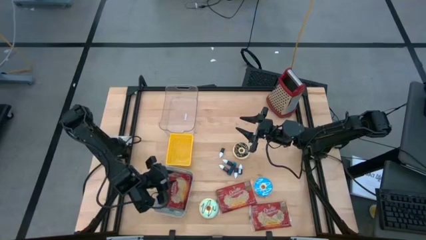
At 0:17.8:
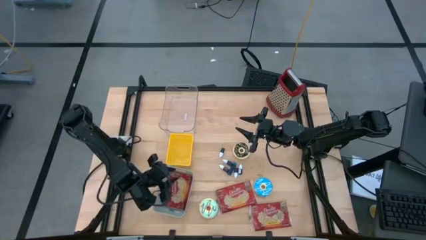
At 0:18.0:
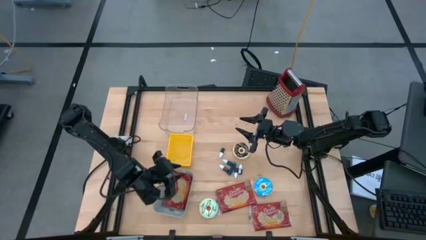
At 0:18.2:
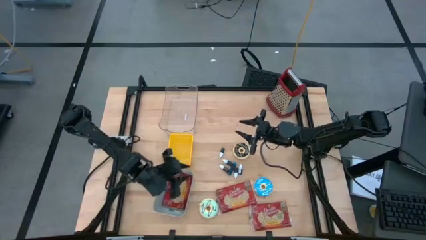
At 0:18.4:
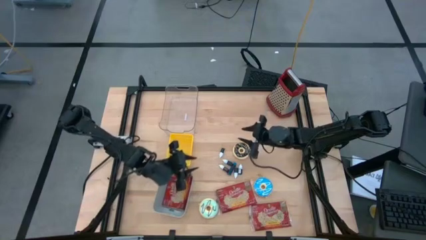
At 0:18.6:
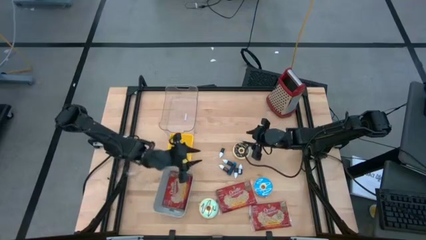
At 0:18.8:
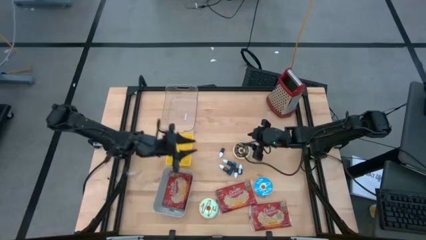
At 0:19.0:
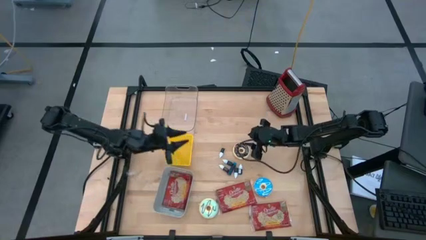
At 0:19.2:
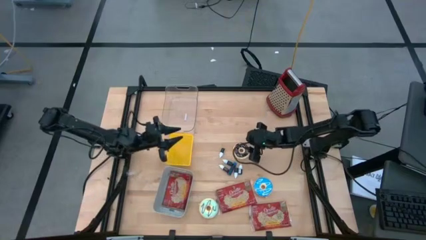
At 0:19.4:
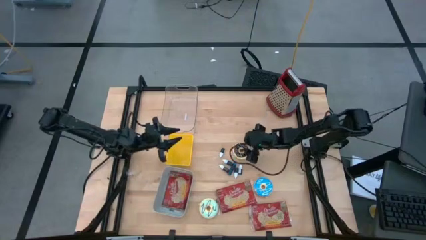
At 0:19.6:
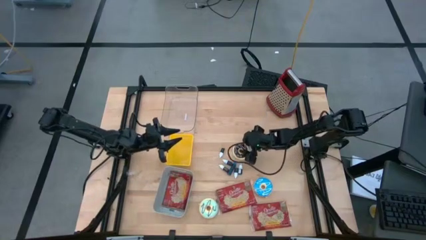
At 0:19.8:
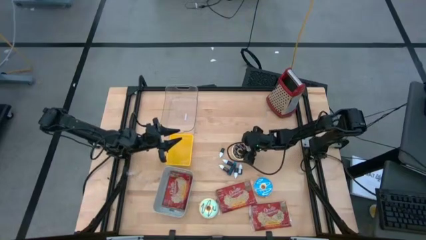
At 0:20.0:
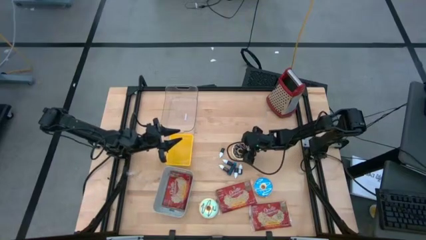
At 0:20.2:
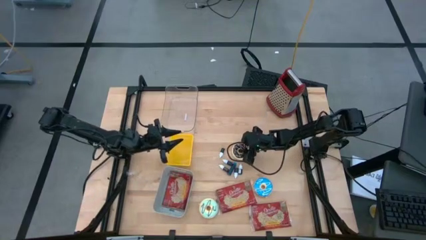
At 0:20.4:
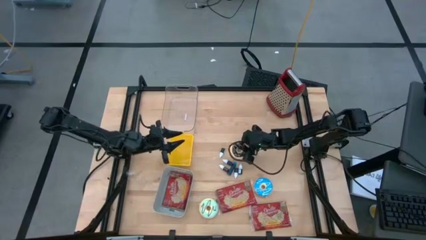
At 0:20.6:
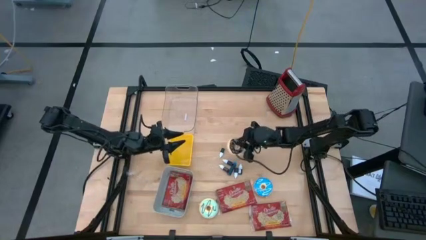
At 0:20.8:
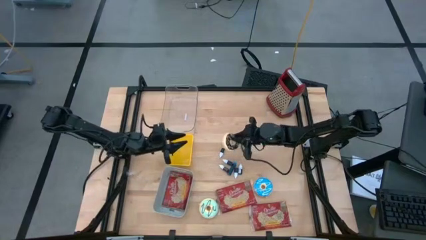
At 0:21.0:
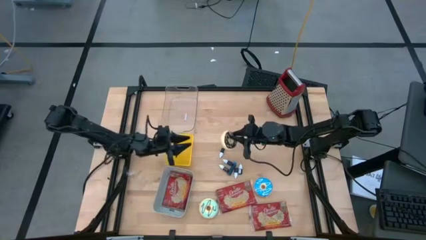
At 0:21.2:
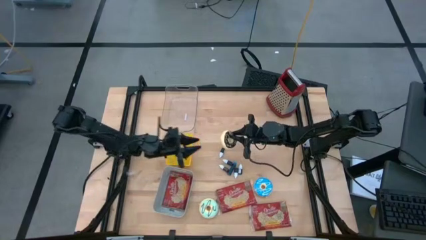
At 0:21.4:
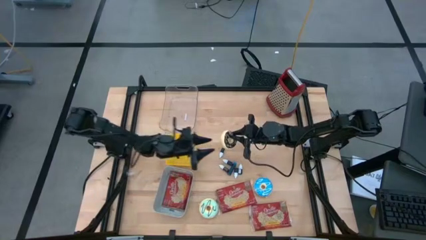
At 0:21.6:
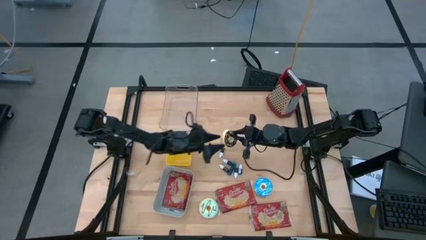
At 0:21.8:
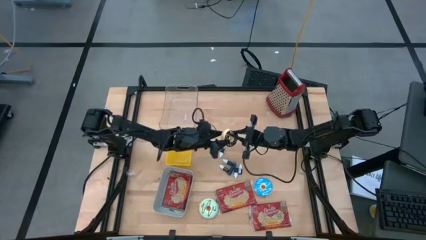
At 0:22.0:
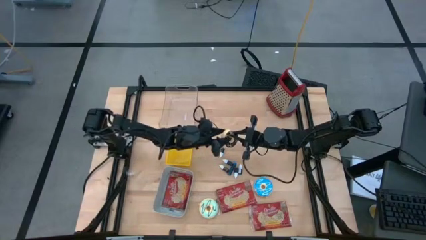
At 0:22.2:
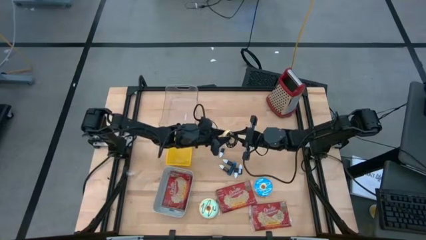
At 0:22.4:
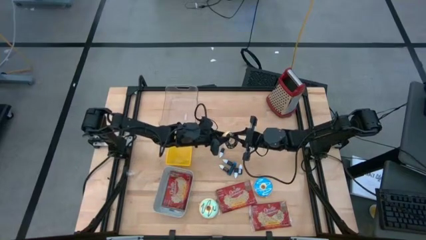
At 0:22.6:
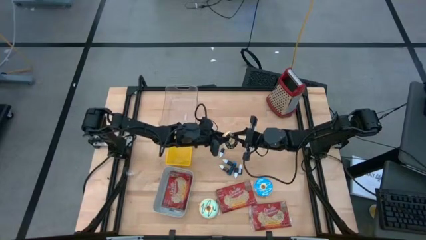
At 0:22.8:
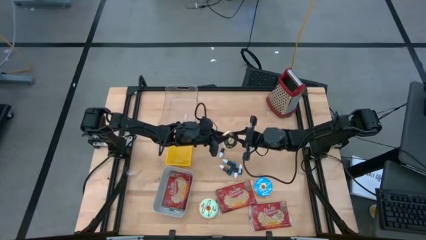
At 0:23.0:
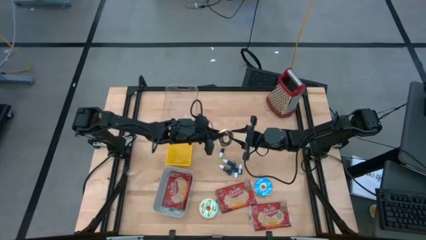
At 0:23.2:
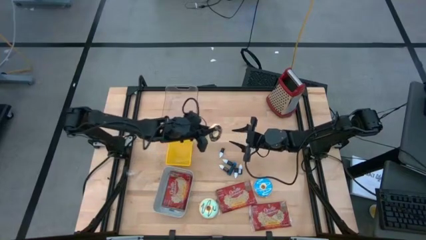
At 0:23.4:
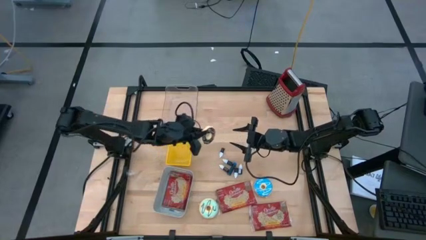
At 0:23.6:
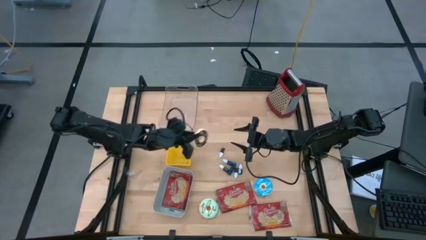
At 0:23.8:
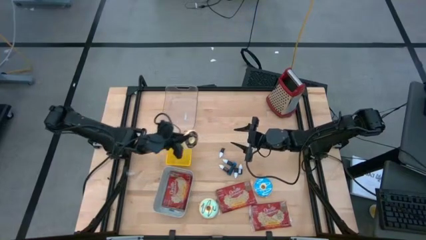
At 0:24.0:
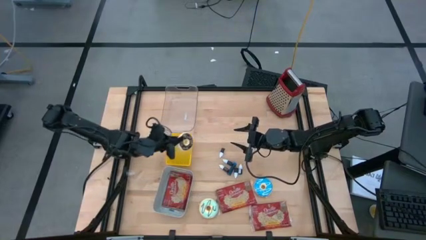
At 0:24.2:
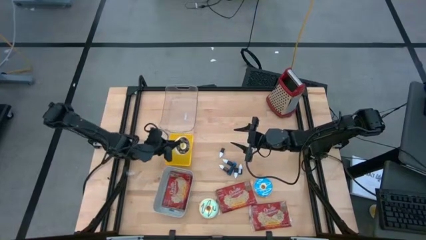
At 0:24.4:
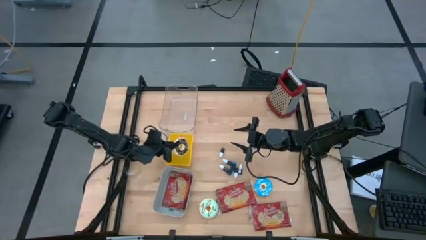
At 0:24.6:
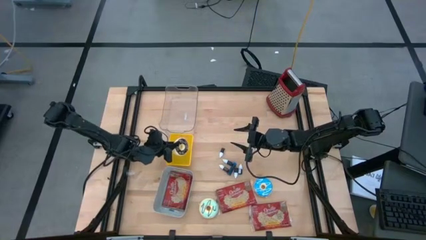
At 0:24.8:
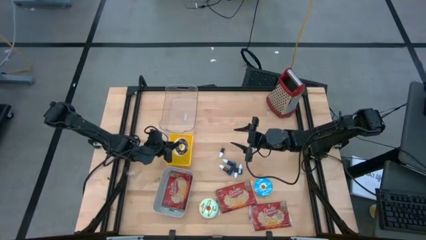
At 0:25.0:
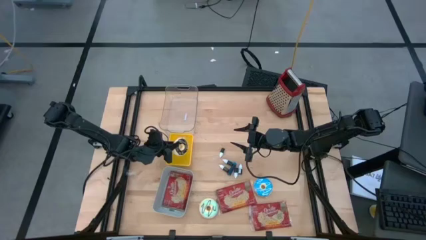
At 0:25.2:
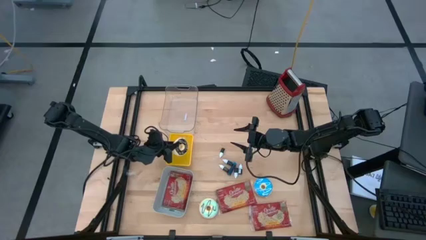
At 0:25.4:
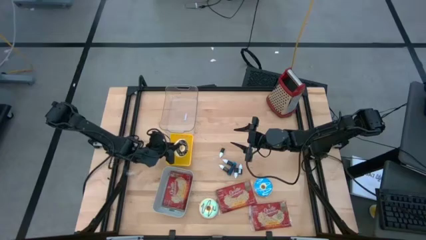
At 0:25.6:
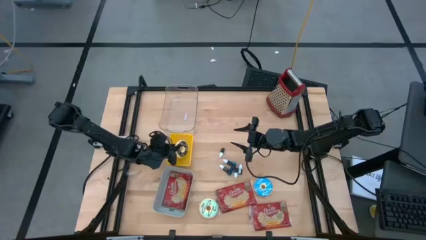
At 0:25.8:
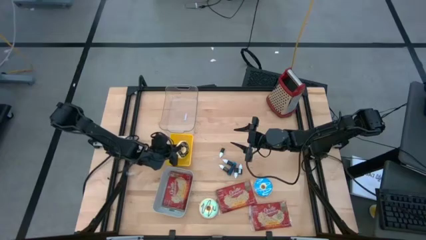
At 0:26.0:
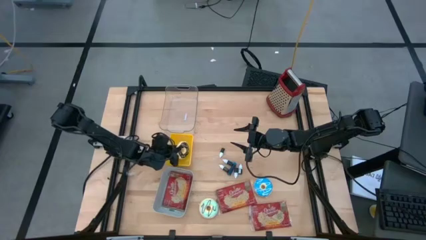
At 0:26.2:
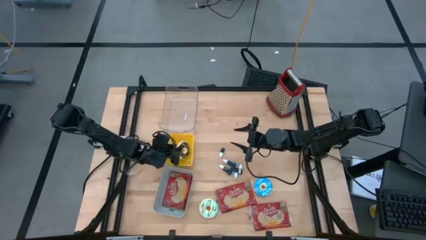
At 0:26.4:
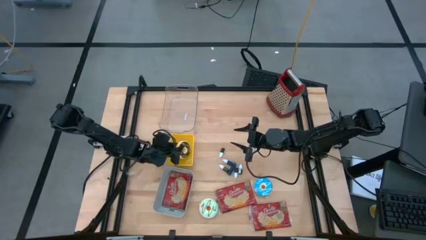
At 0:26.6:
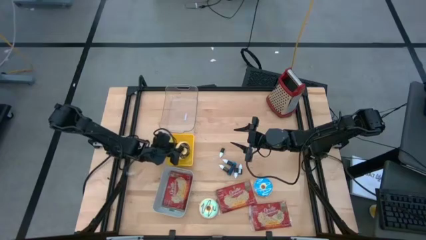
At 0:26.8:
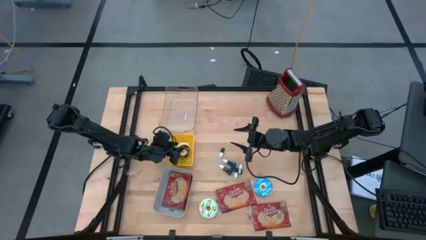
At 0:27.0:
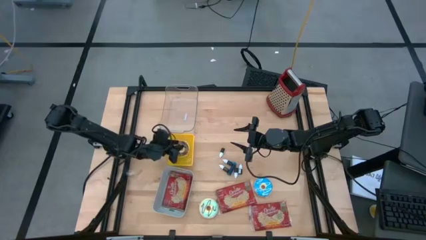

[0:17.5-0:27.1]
Task: Pick & Place Food Item
Put the black doughnut into the yellow bin
